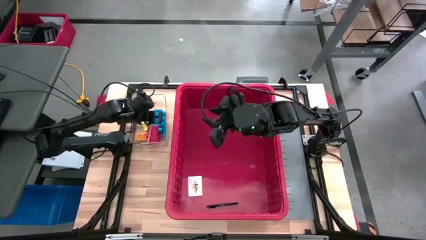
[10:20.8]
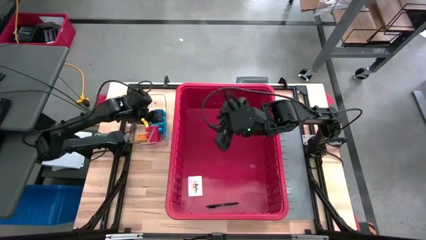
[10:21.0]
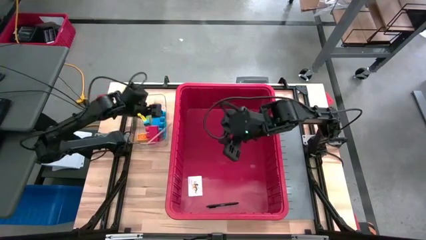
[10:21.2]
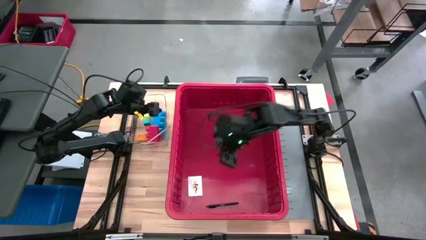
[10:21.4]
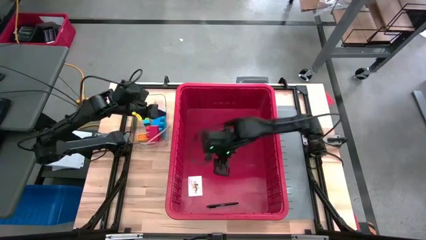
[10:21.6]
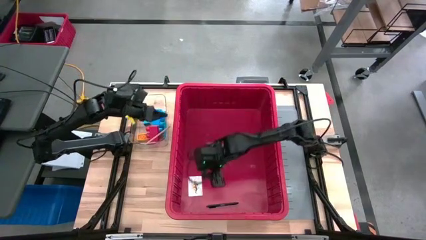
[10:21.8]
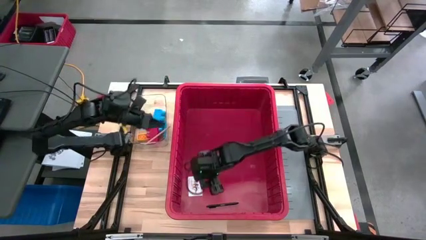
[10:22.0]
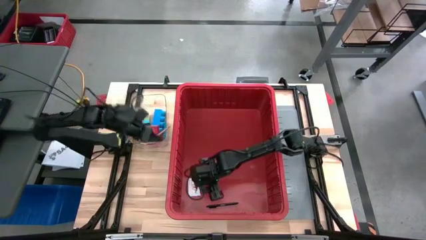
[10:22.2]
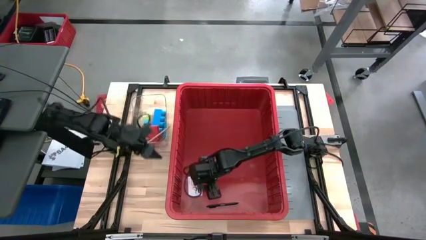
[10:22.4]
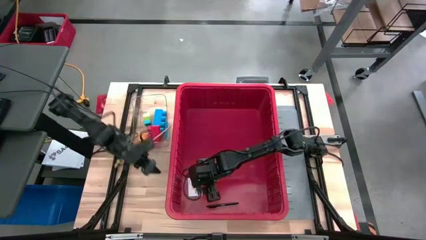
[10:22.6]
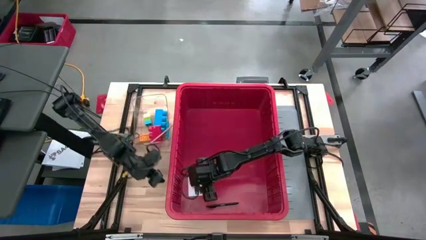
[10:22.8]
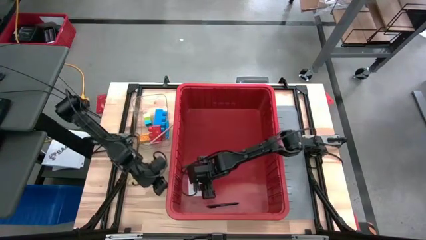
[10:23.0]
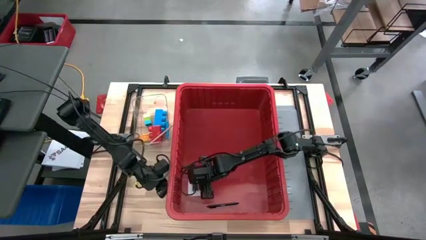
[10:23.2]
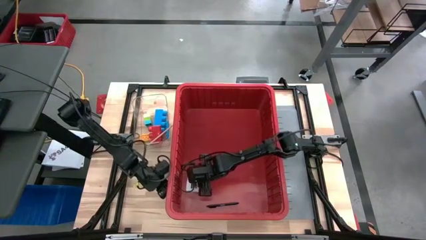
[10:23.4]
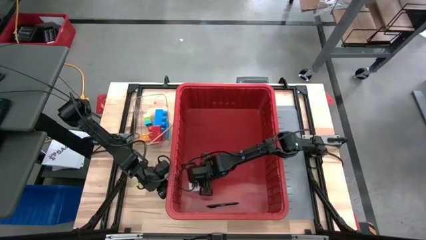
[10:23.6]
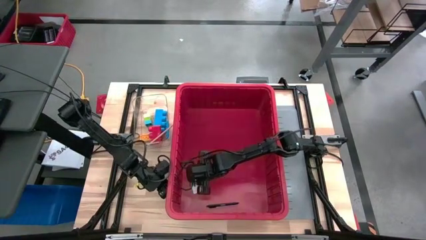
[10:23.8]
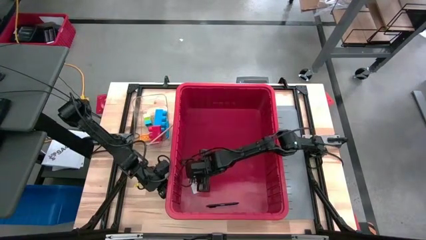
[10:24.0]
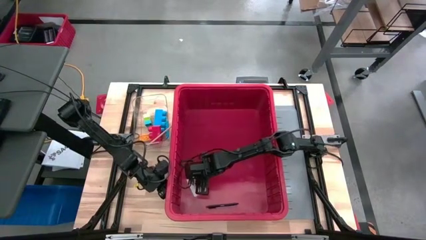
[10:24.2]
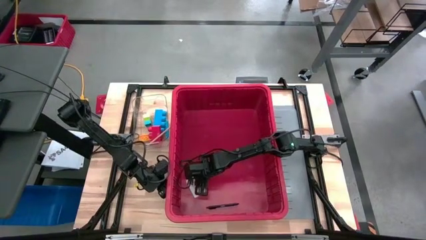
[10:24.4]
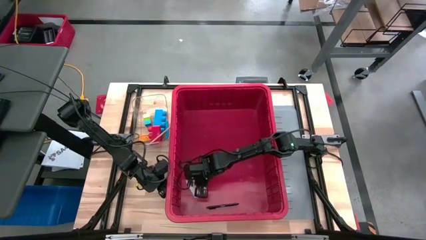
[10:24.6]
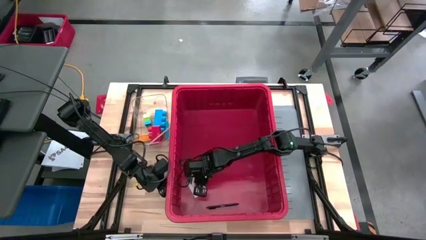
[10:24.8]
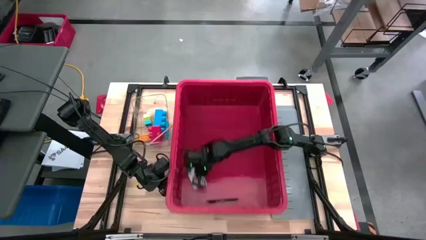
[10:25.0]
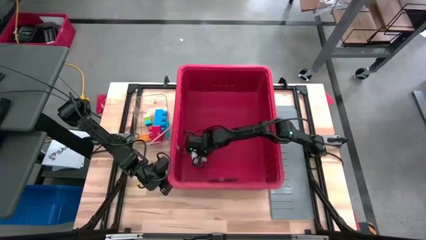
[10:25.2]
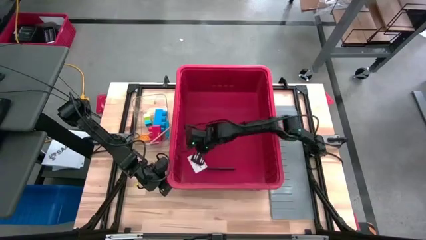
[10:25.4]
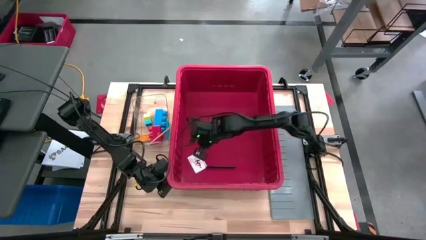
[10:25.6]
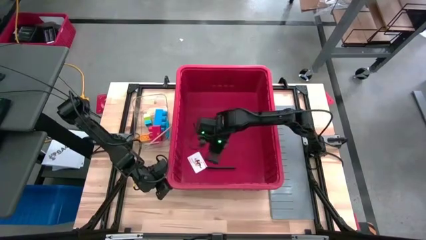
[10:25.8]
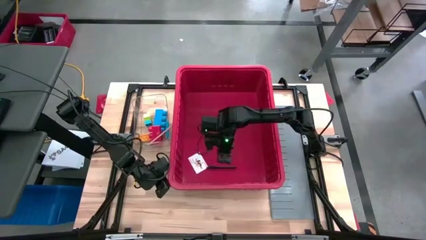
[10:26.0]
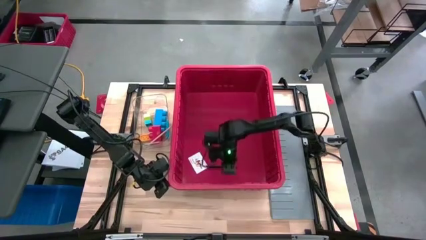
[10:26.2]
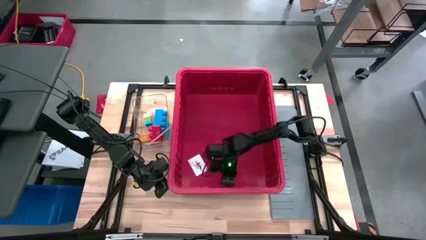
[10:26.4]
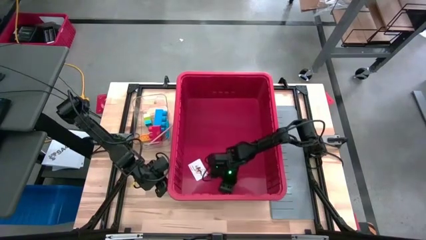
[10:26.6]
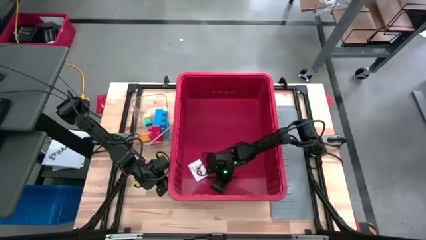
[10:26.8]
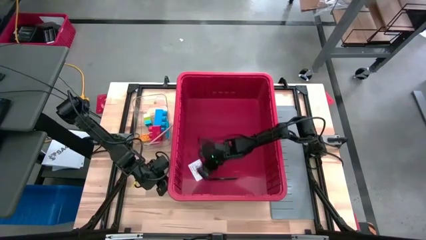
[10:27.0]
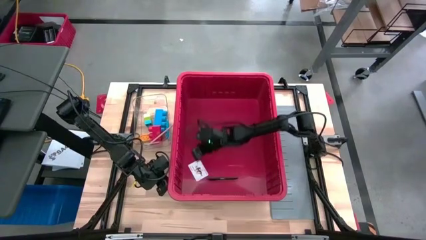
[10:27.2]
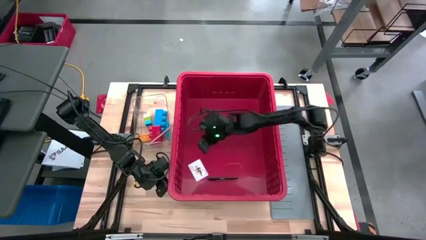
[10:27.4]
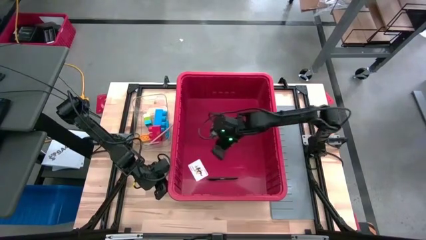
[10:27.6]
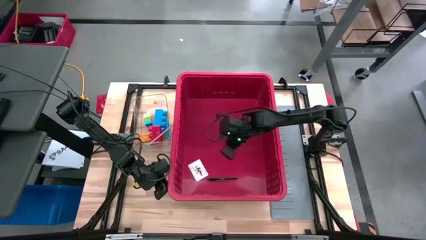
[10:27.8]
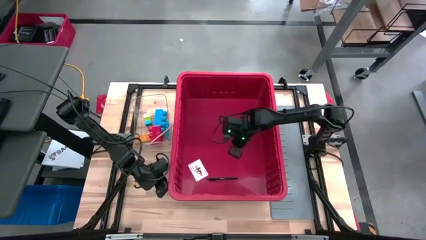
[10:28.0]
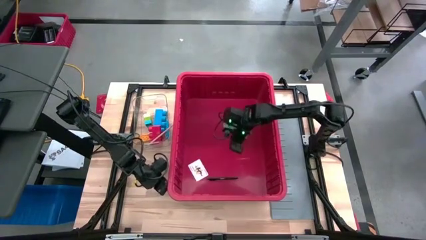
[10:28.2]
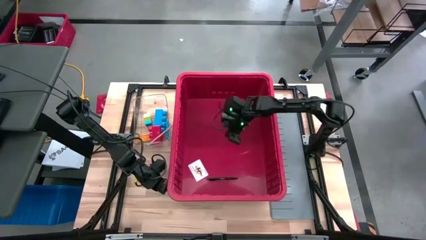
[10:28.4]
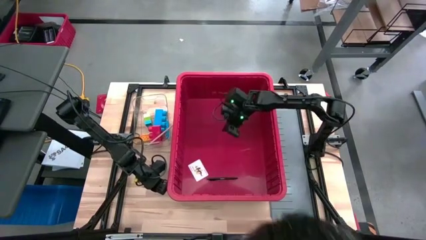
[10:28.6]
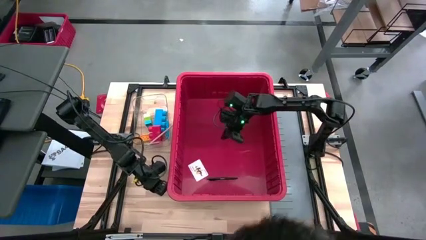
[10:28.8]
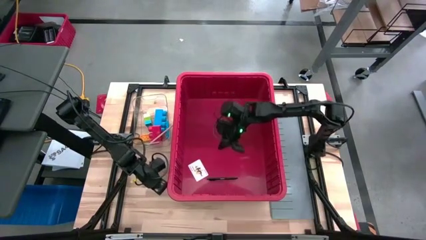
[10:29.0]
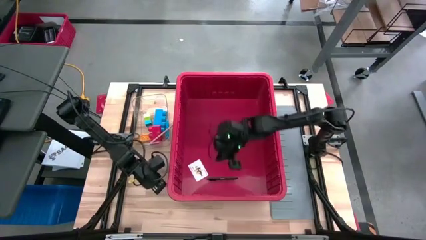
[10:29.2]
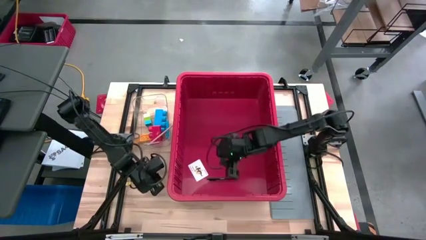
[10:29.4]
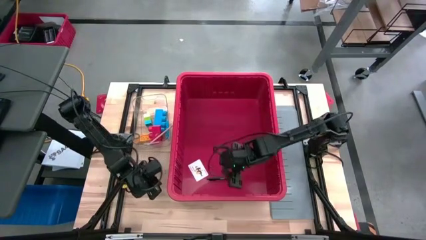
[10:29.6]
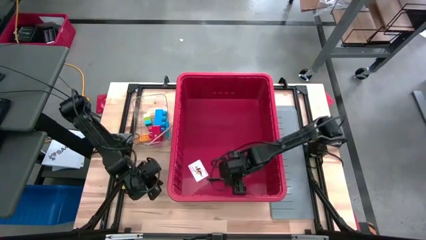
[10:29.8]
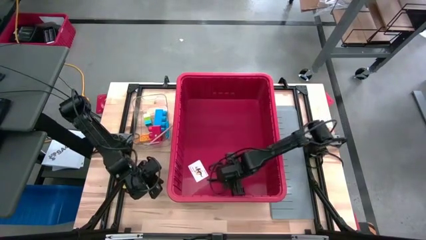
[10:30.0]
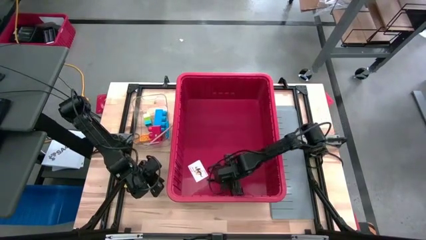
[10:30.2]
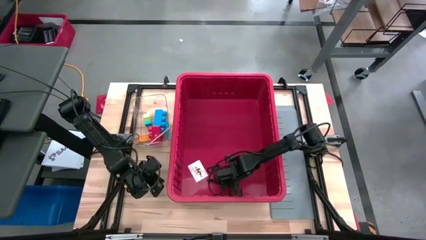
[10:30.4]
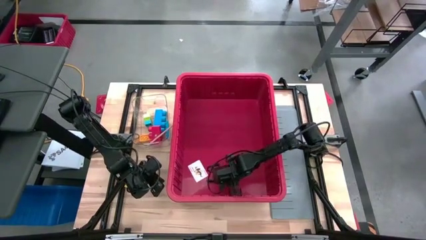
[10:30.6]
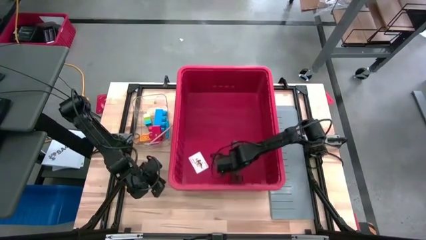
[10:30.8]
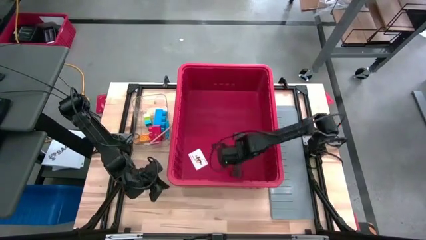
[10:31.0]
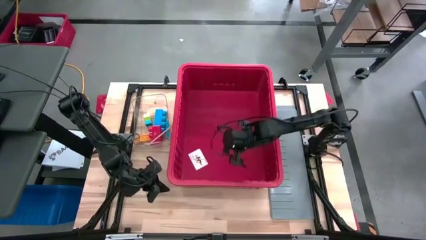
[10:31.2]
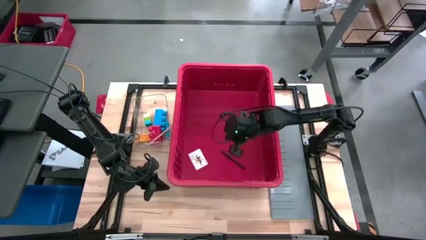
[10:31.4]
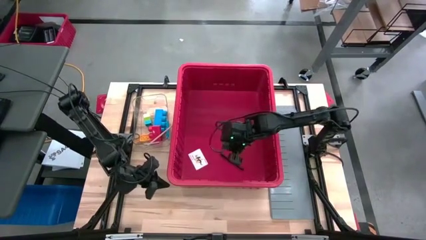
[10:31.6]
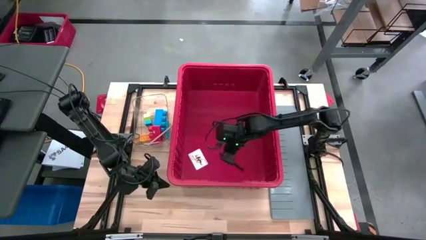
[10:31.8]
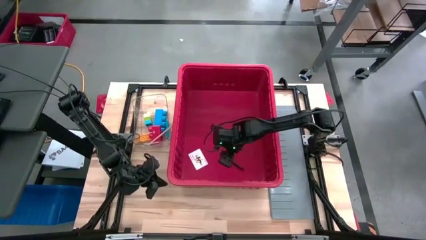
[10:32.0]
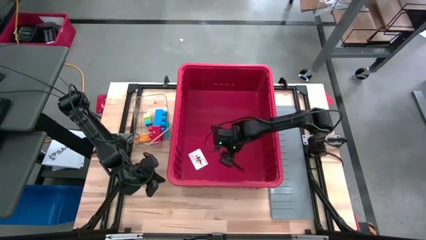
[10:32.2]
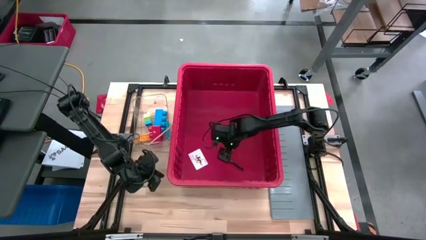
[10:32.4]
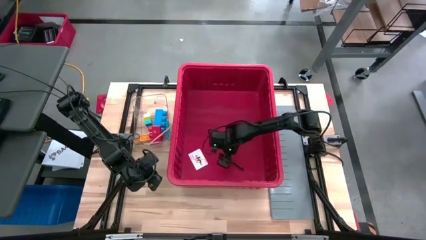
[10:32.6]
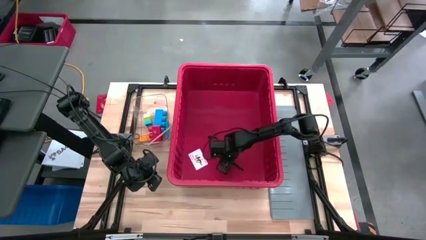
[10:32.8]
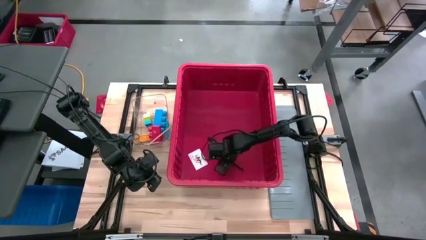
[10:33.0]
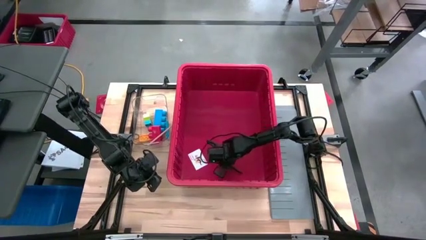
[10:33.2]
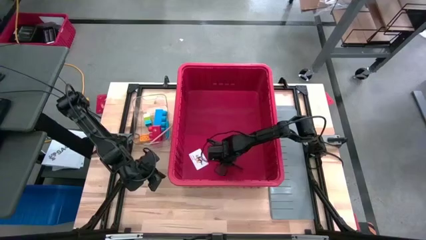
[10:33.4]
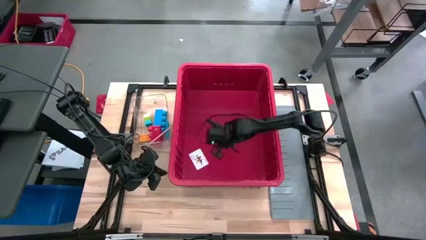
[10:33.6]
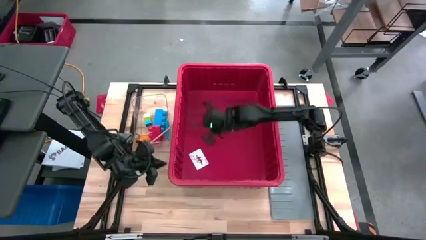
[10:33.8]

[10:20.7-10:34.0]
Task: Sort blocks
Remove the black pen from the bin

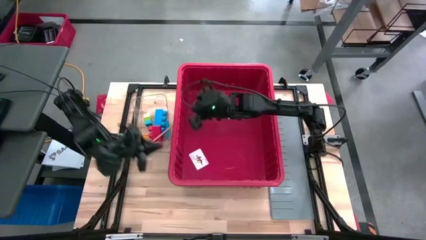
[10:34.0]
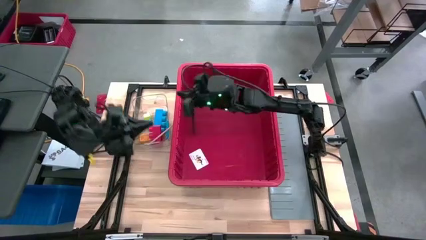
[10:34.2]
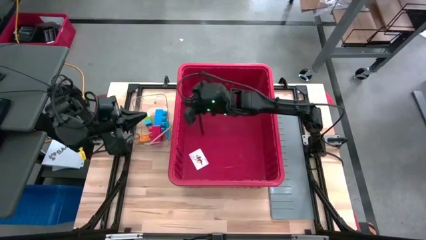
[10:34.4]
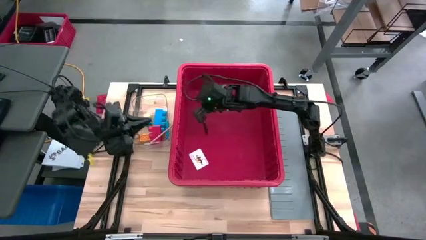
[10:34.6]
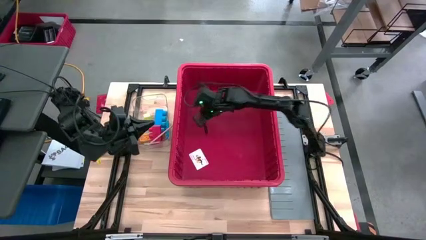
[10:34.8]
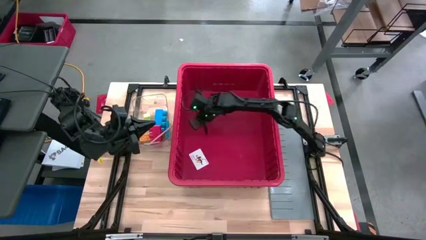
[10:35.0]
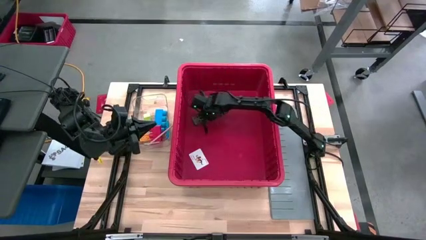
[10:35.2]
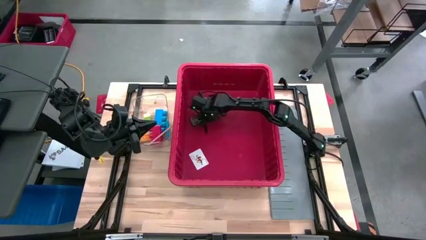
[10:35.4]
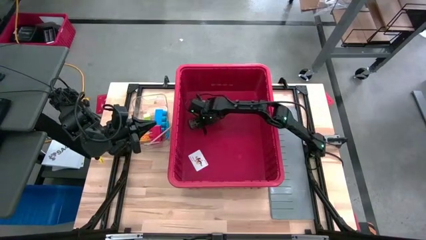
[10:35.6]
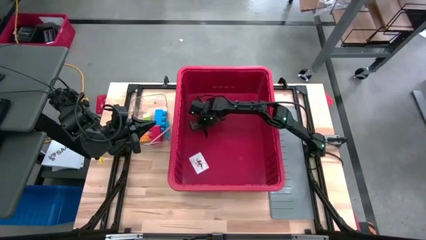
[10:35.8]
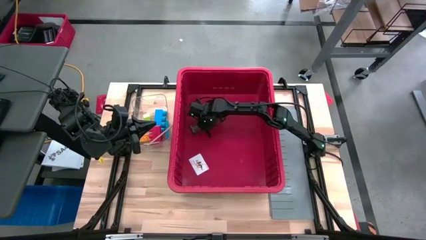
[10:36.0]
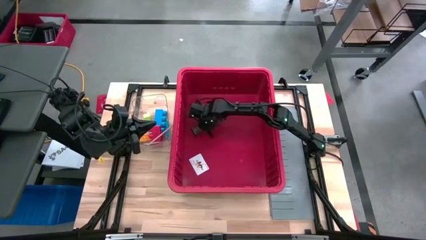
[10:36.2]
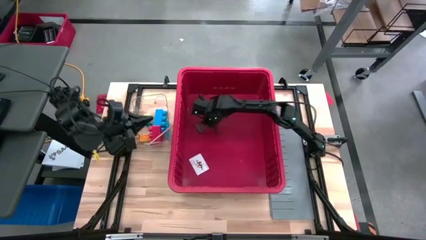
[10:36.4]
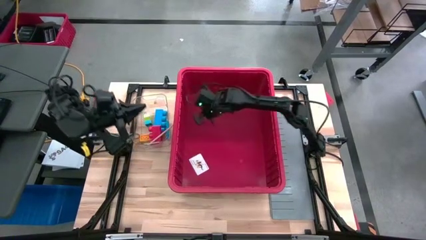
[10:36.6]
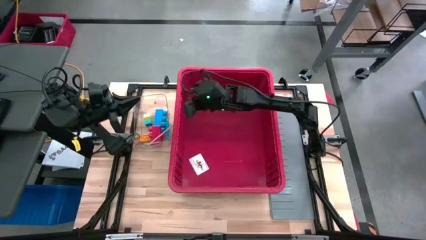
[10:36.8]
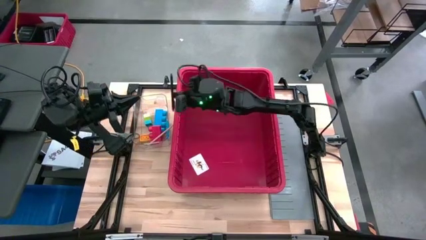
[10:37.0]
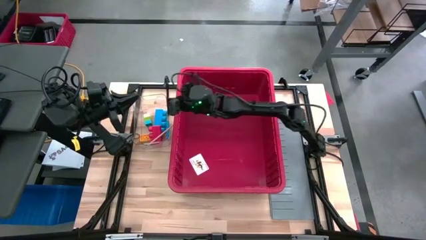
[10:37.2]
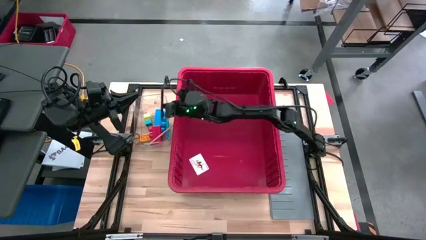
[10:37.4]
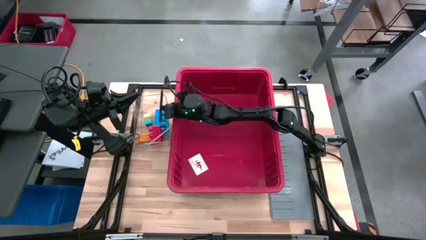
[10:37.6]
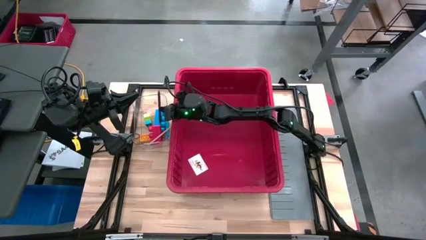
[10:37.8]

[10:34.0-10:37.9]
Remove the black pen from the bin
